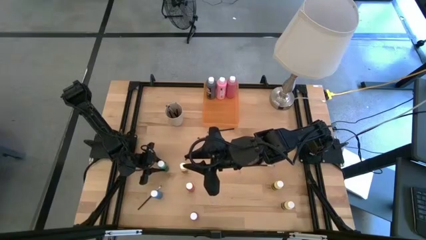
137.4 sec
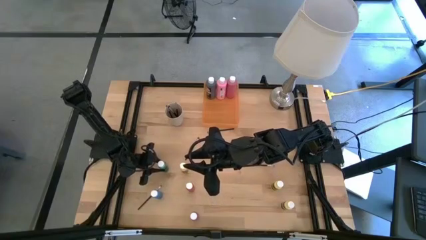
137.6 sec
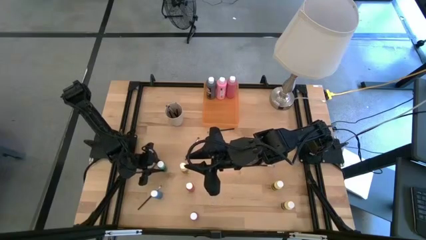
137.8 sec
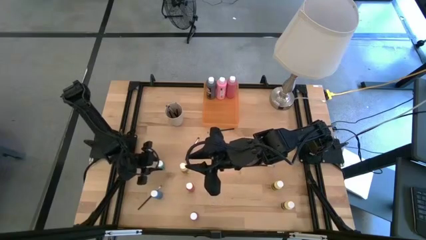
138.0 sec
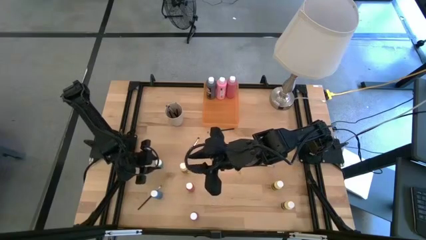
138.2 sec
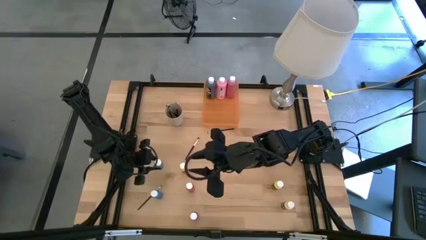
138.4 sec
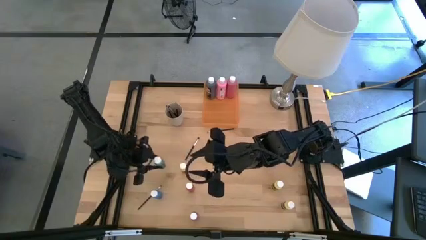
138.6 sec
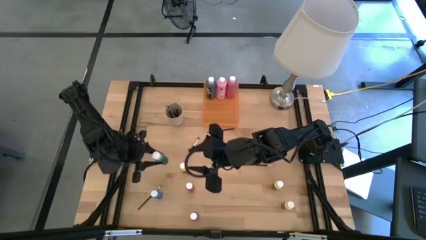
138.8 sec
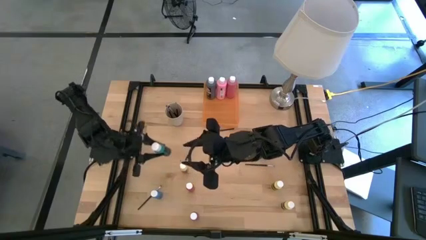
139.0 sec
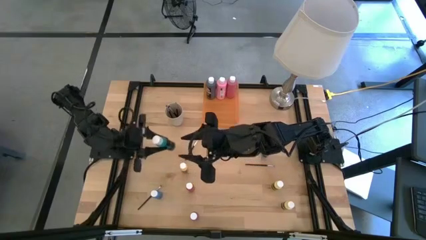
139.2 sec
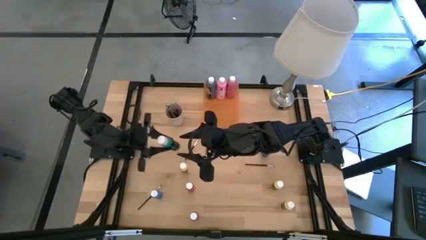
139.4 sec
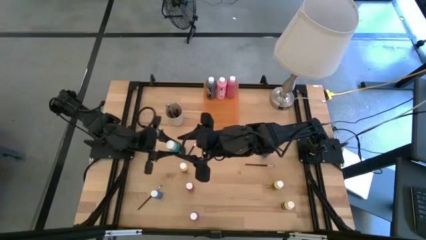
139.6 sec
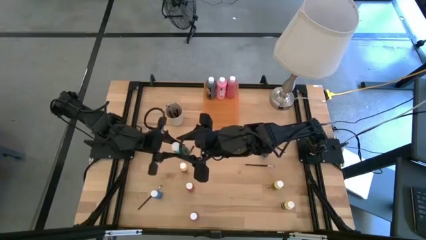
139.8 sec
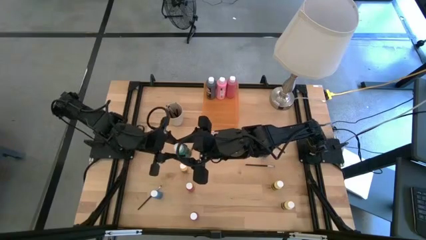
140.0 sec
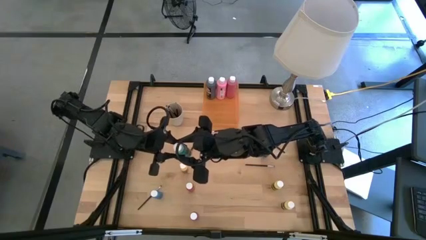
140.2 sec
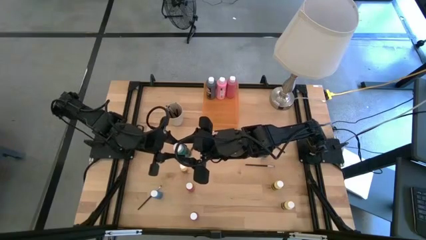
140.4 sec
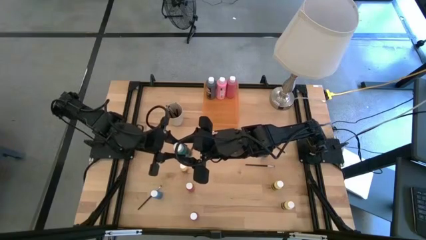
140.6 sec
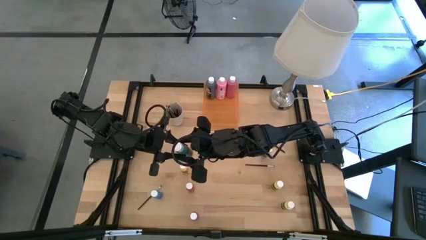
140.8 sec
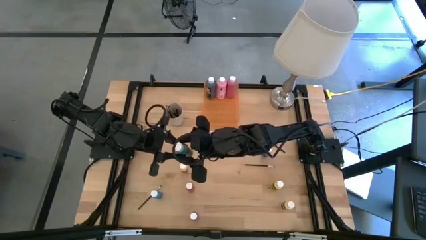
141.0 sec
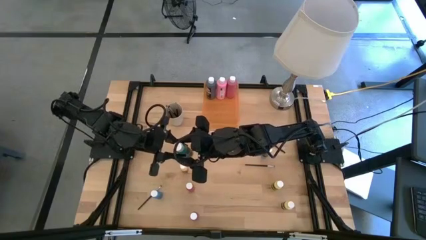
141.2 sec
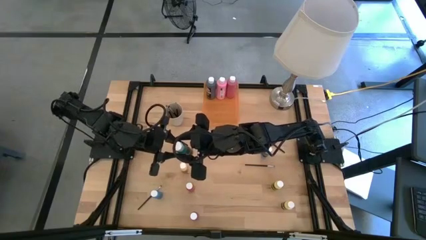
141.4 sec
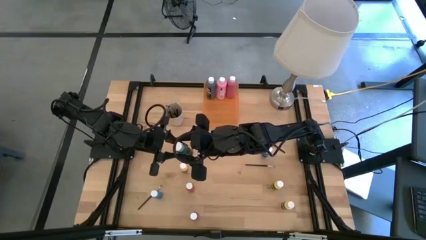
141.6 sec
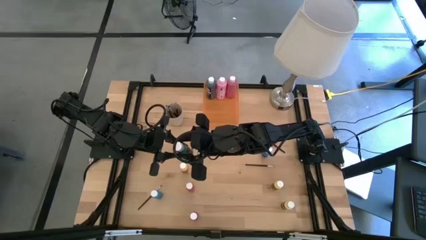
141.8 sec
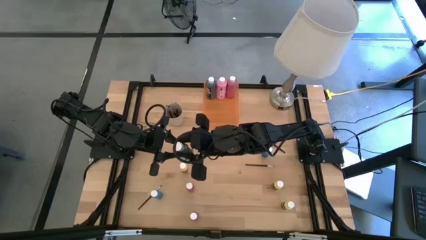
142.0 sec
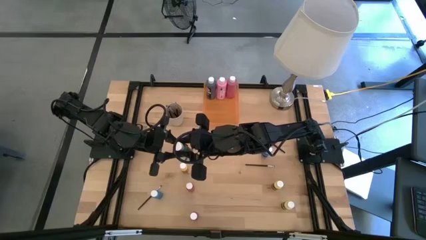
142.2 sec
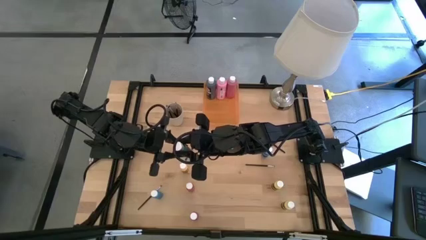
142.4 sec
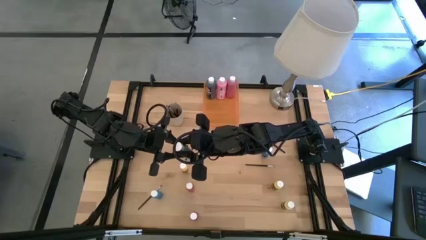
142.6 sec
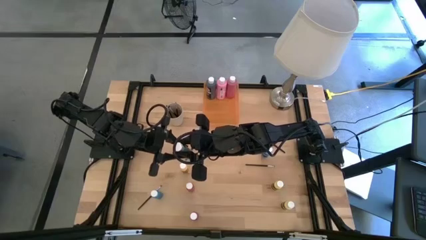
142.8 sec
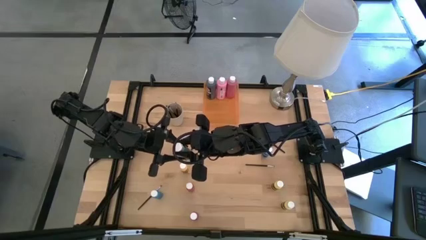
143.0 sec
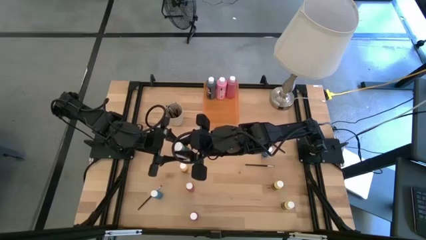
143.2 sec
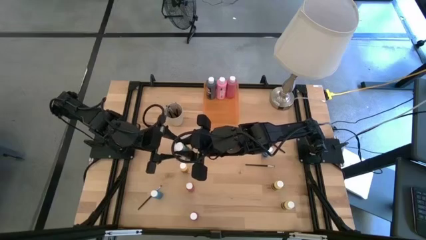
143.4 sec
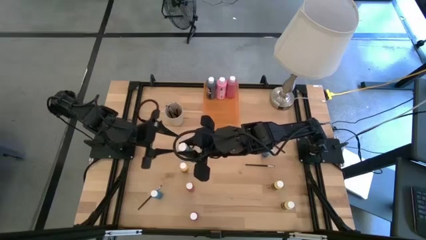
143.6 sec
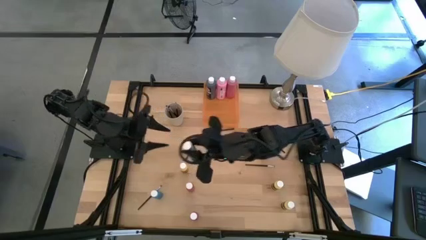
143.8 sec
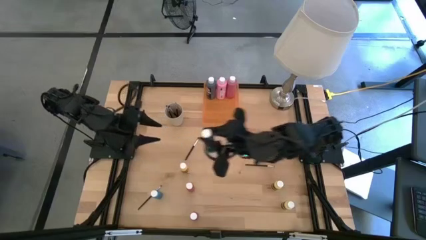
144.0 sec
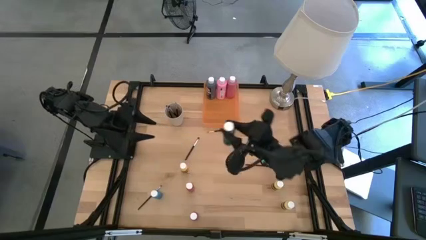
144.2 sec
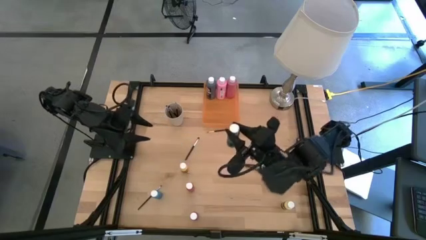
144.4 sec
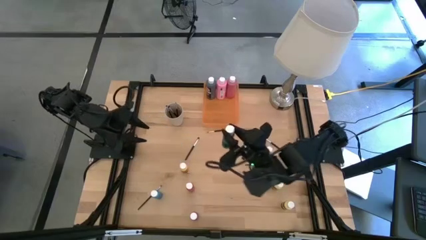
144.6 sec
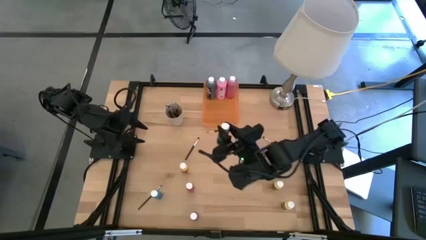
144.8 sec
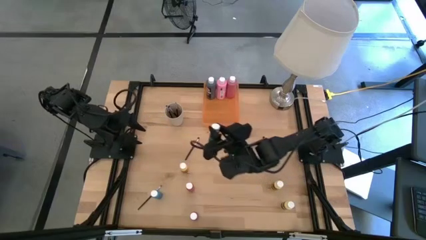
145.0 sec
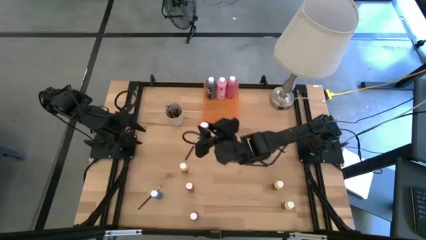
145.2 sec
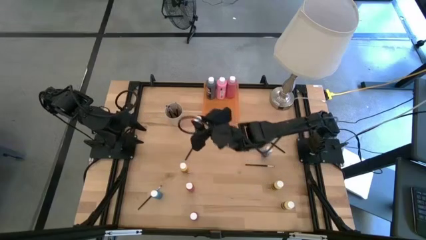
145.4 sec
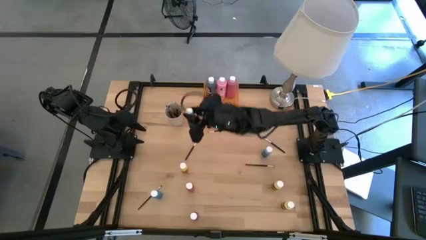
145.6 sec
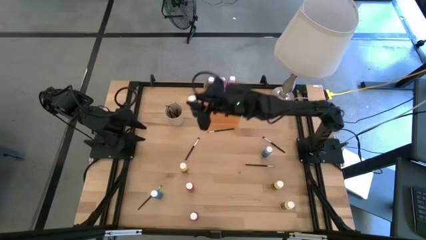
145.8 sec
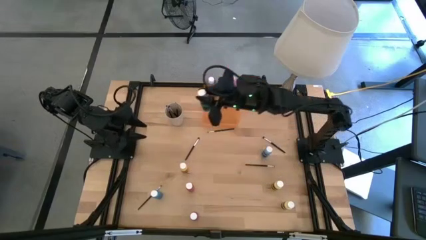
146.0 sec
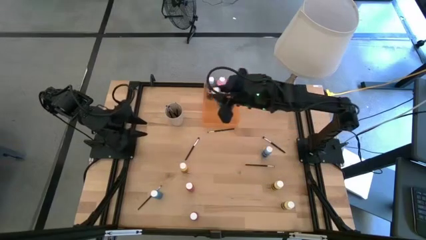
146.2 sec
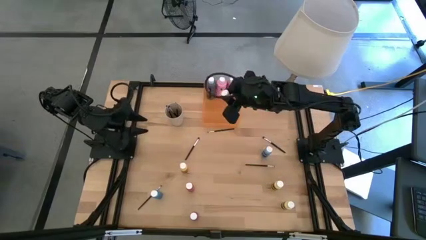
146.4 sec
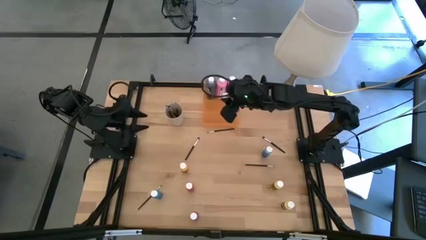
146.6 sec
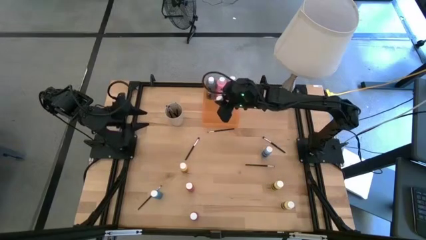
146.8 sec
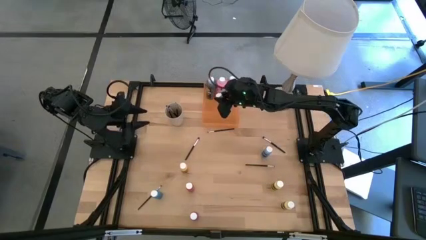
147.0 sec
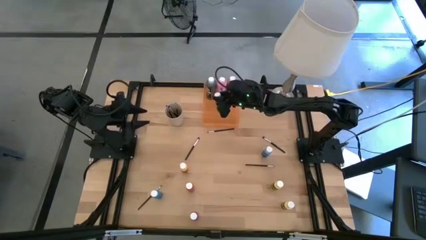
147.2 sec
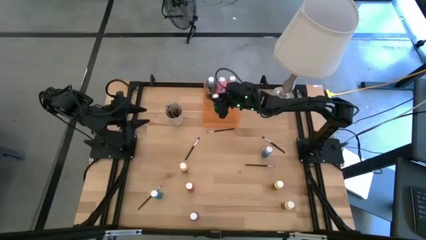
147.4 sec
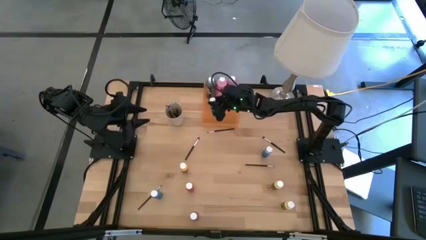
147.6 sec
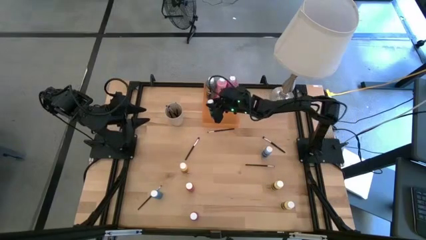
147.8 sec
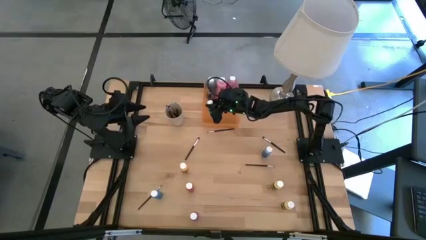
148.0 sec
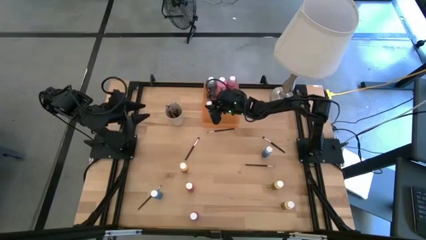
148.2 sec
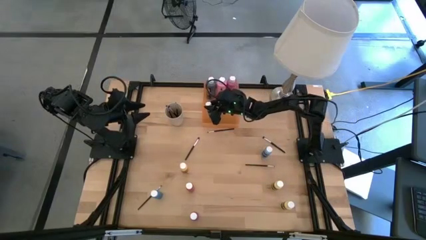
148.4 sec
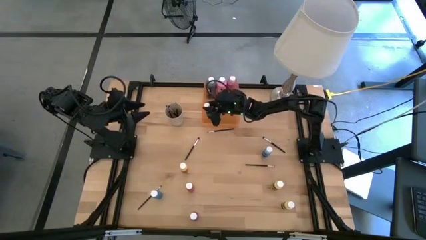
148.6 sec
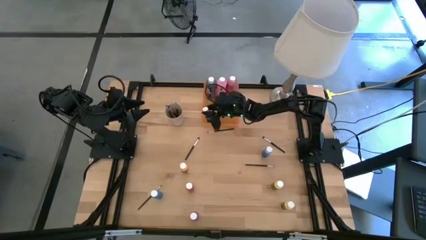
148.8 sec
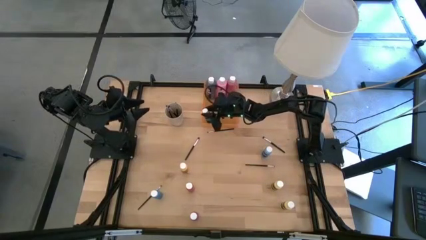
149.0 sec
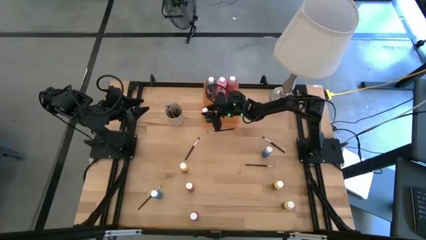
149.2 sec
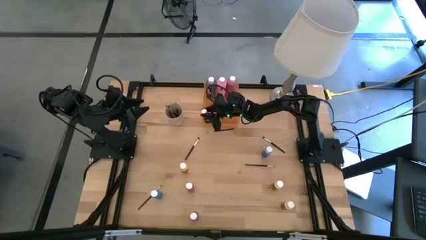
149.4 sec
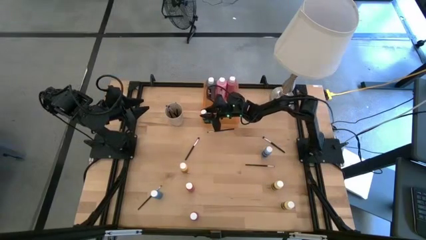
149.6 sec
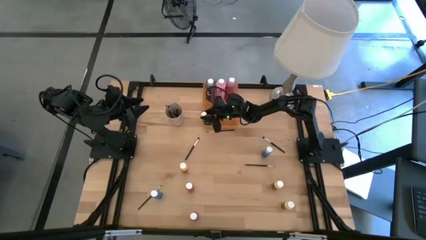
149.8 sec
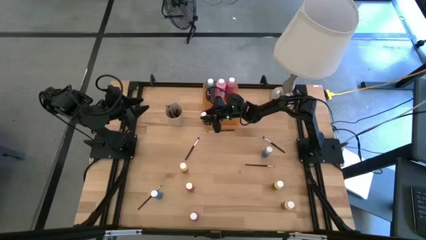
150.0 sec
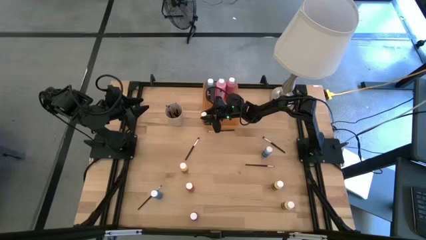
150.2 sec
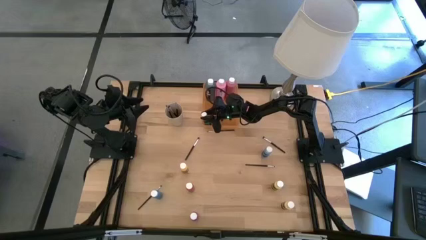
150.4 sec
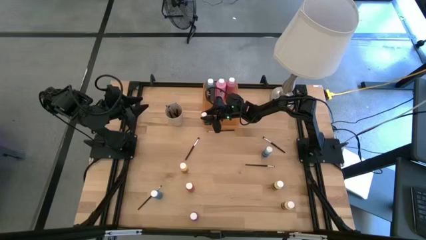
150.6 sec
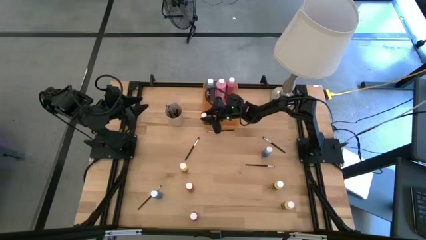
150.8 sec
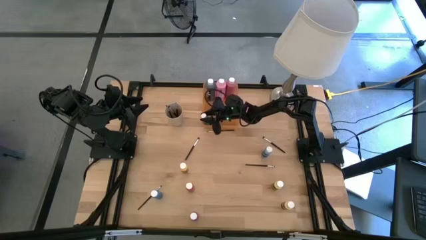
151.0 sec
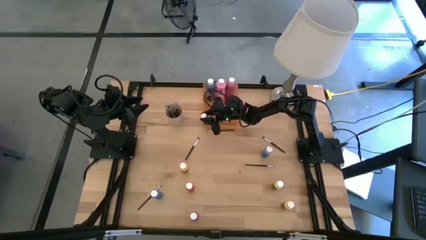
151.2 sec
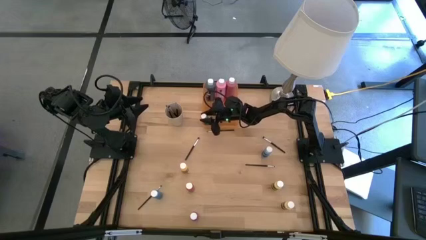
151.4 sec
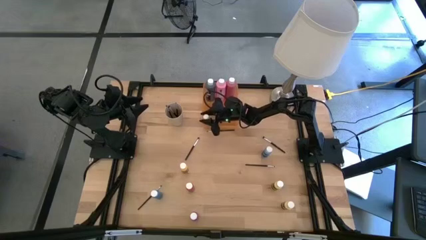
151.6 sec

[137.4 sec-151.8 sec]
Task: Pick & Place Paint Supplies
Put the green paint bottle into the orange bin

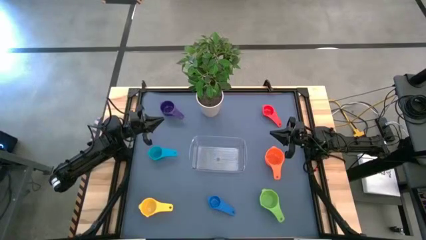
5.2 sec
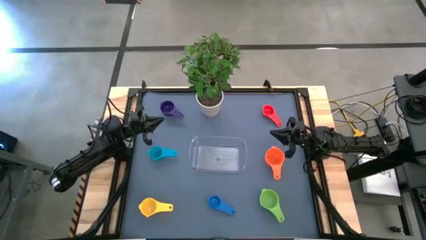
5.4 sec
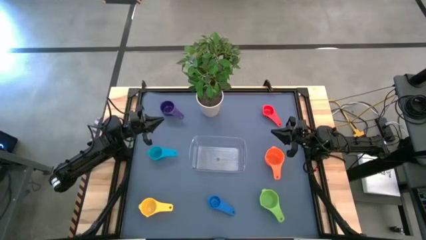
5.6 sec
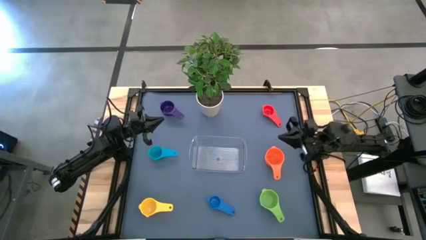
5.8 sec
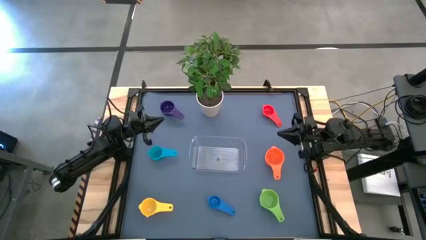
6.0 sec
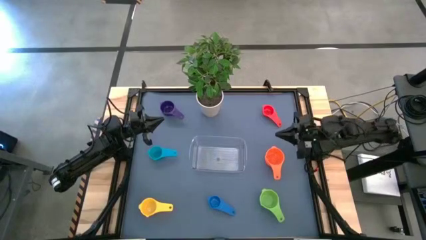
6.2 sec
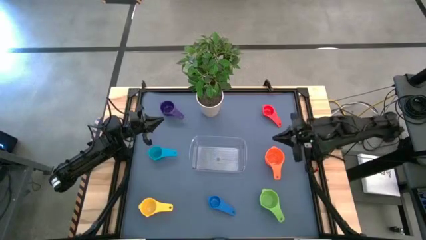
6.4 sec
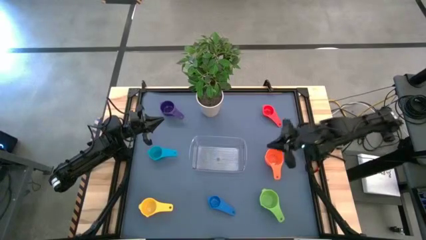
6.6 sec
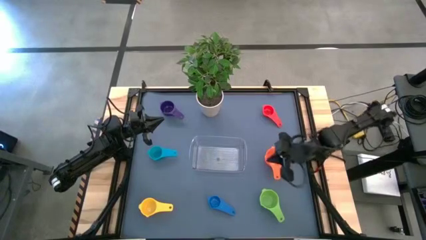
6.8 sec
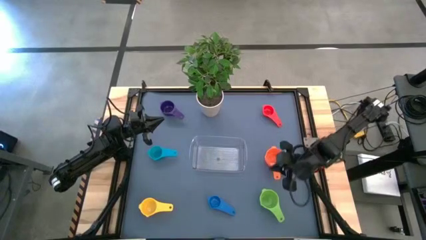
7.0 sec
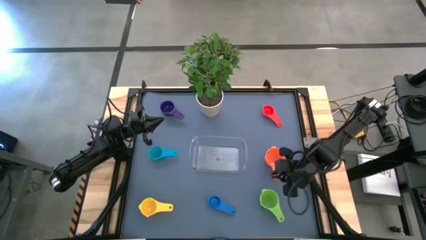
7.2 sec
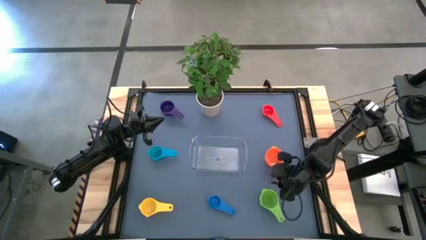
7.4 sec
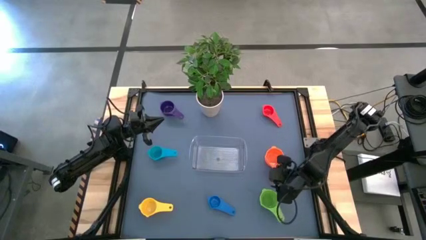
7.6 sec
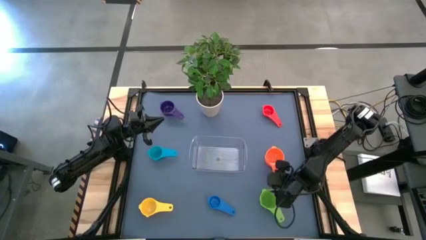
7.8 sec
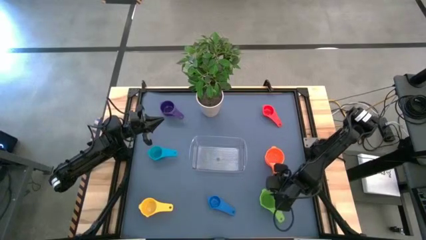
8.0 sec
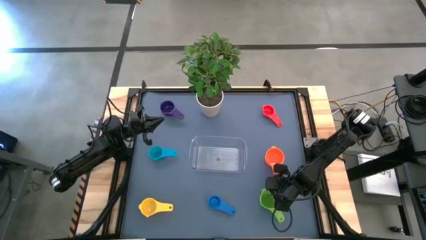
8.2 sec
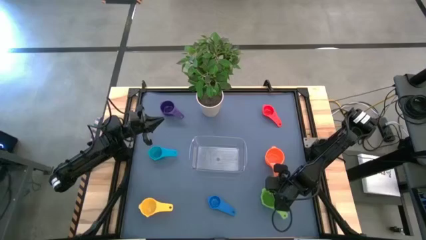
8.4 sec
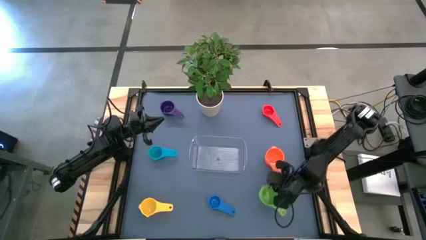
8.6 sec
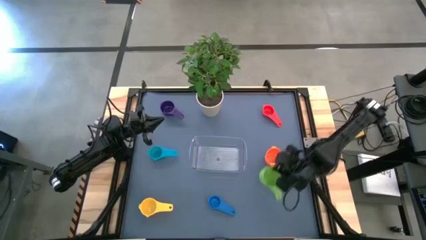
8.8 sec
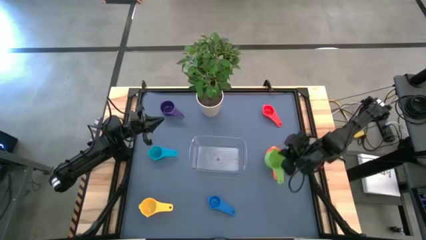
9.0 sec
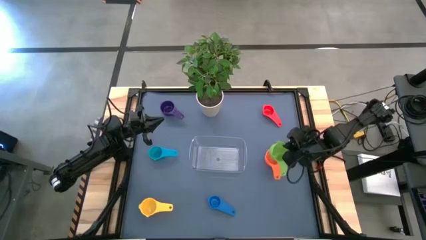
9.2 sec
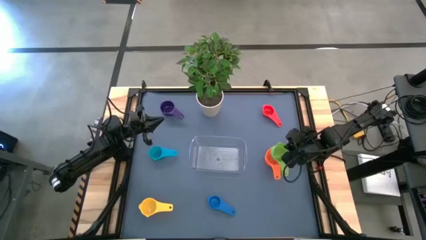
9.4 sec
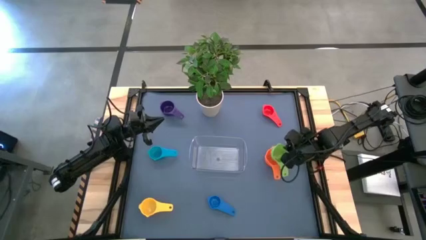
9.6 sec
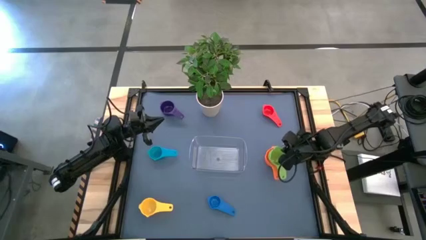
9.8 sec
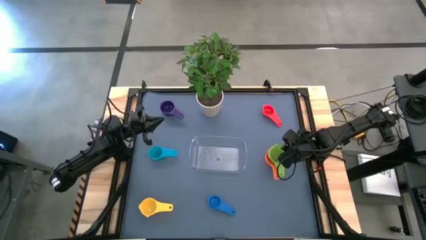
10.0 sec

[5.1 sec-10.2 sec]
Task: Nest measuring cups in basket
Stack the green measuring cup on top of the orange measuring cup
